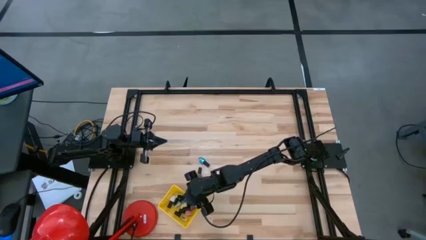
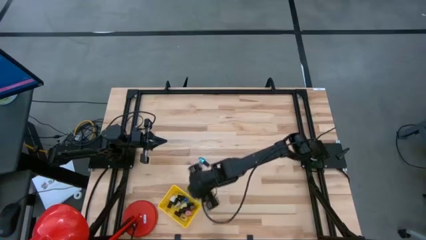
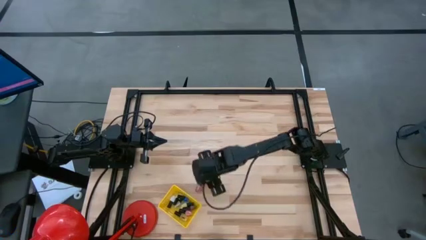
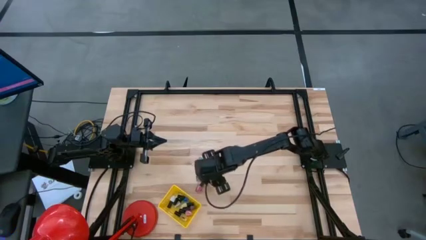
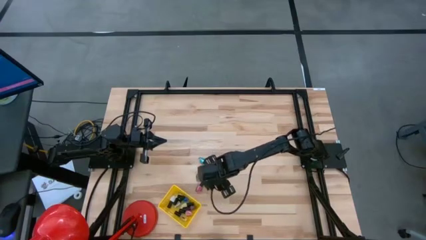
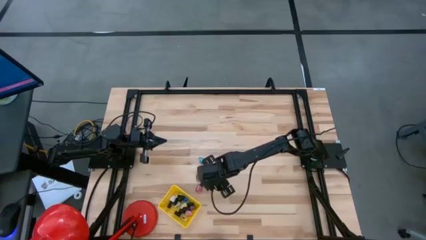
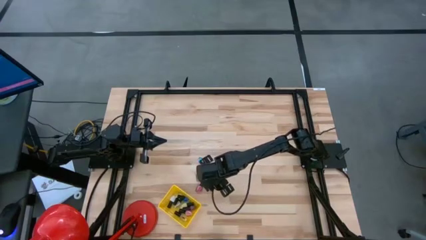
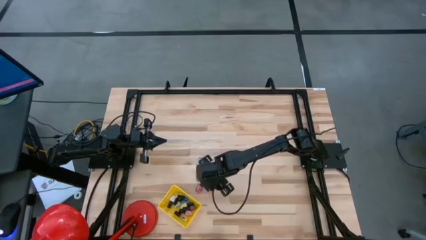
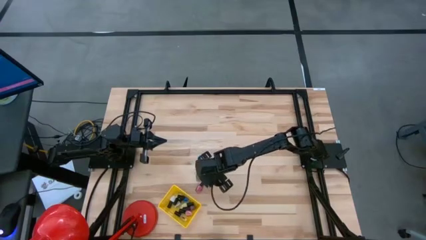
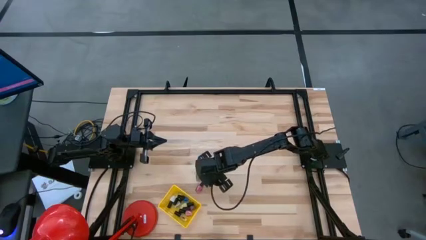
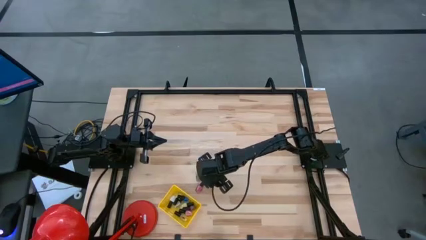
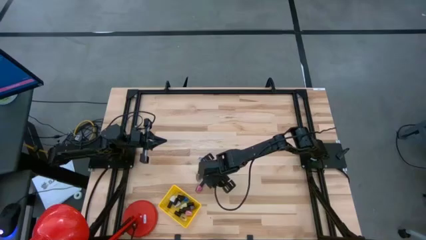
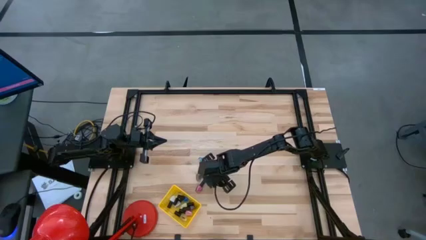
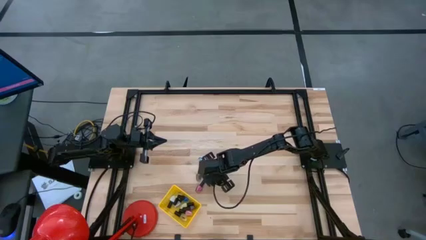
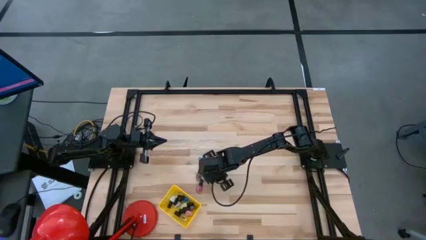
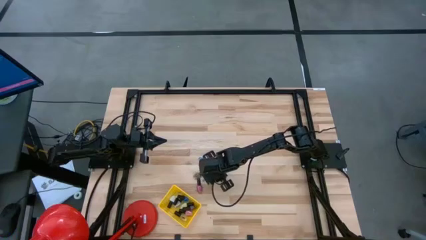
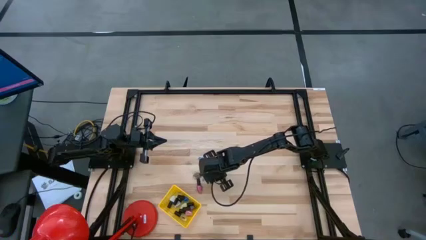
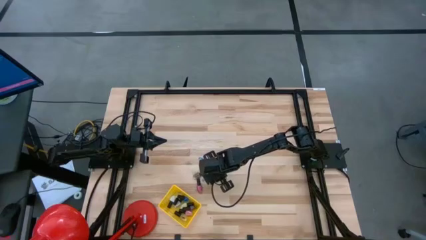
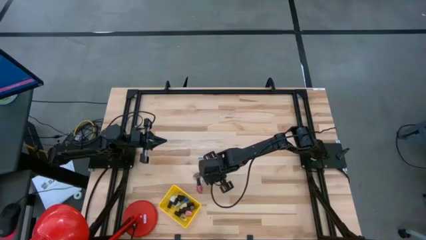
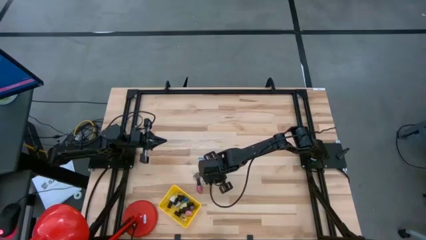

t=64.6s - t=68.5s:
Task: Pick & Place Nail Polish
Put the transparent nail polish into the yellow basket

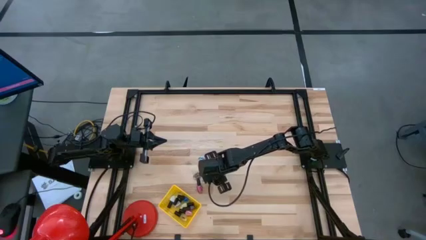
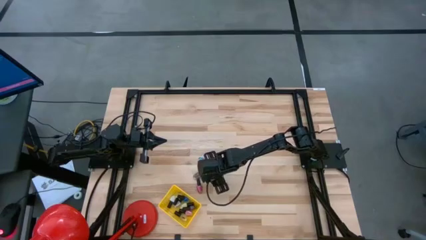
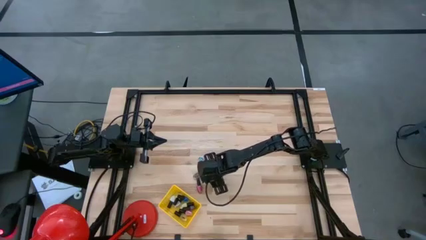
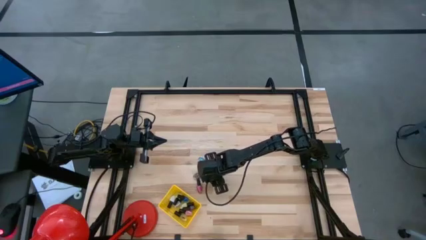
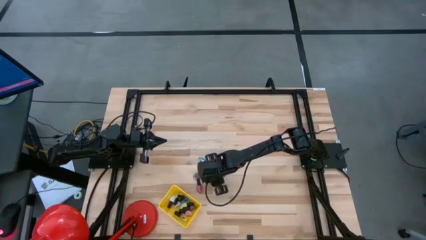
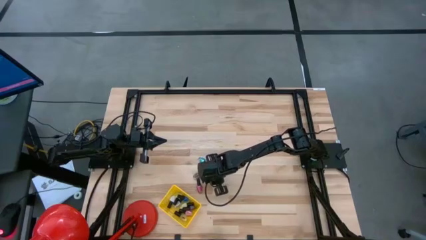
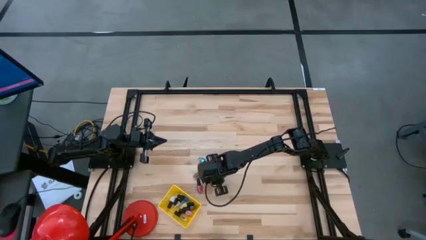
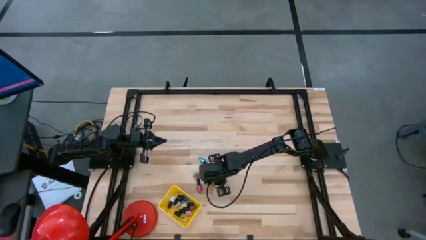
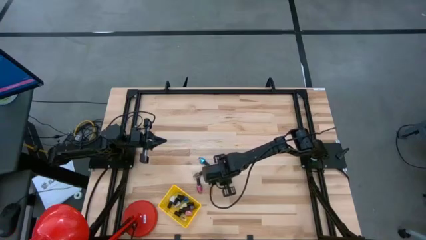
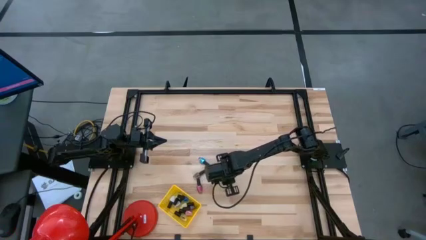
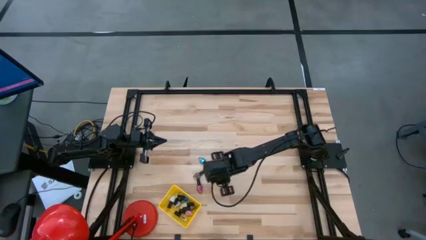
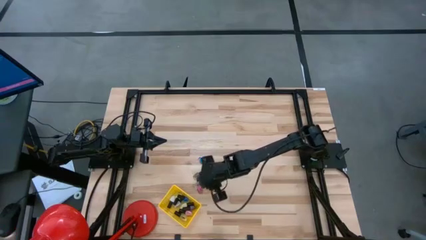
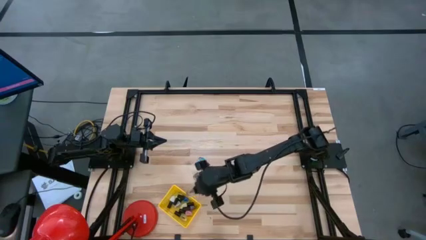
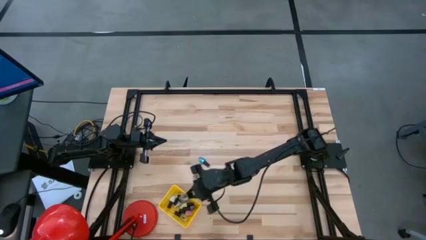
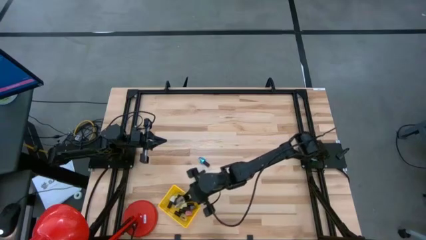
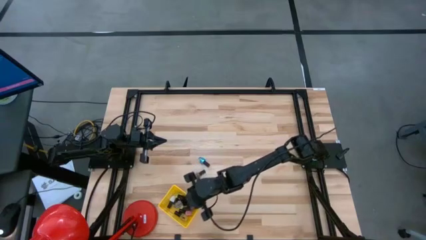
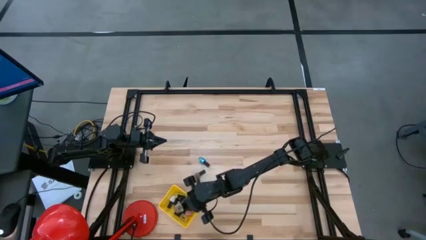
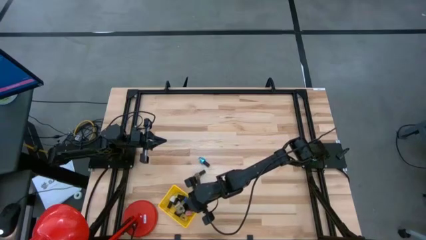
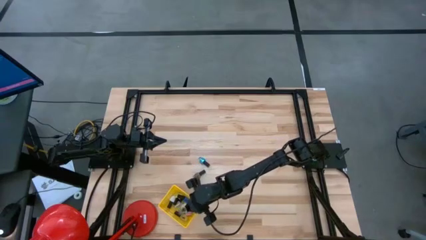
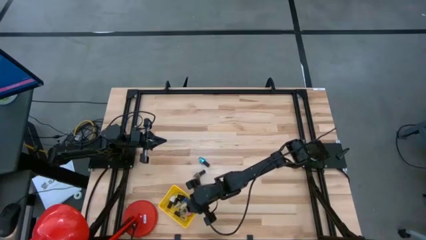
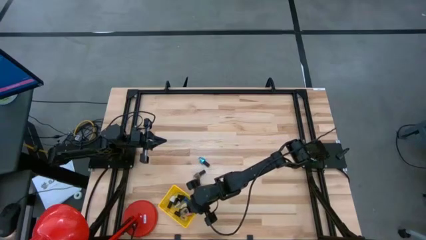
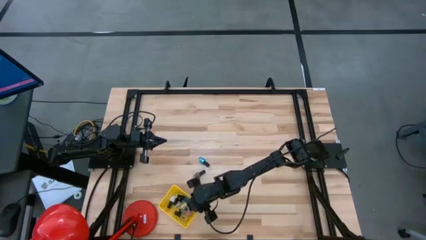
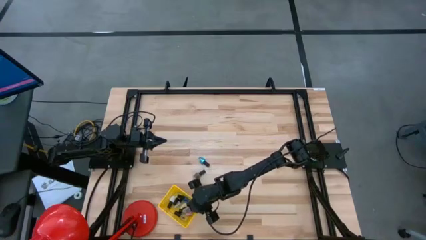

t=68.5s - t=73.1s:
Put the transparent nail polish into the yellow basket

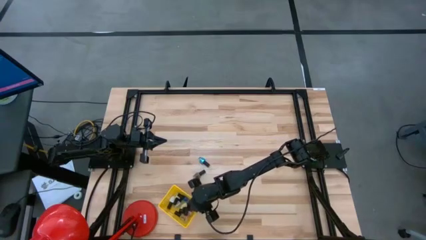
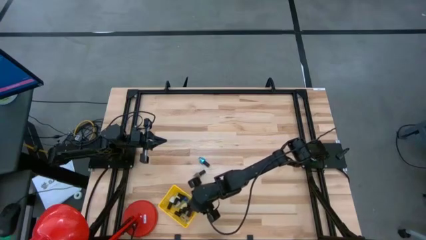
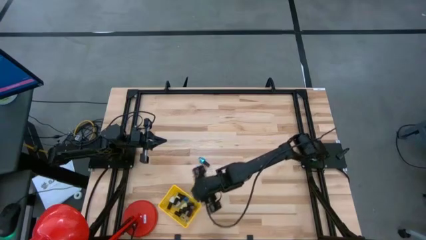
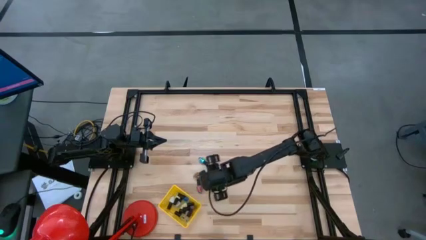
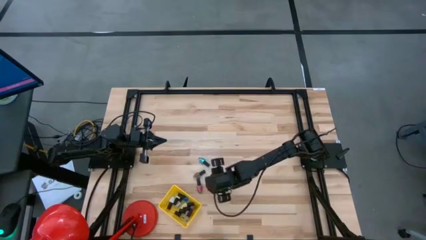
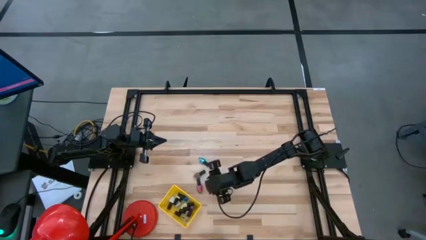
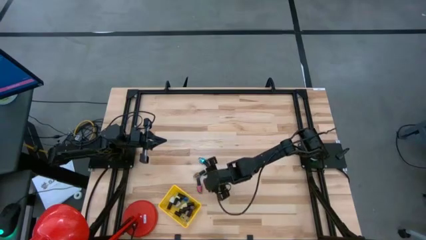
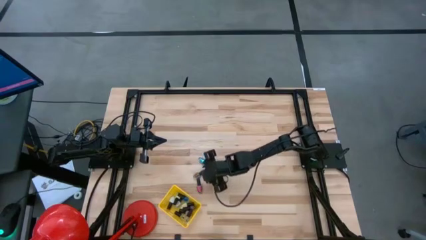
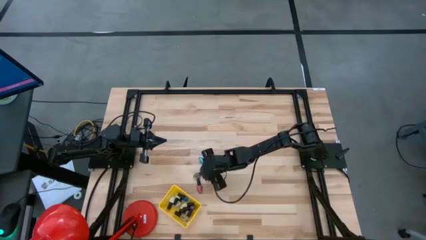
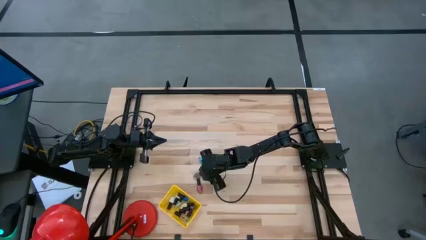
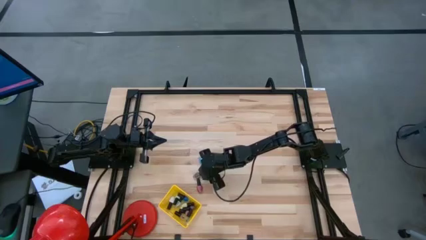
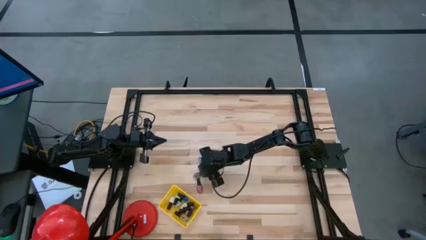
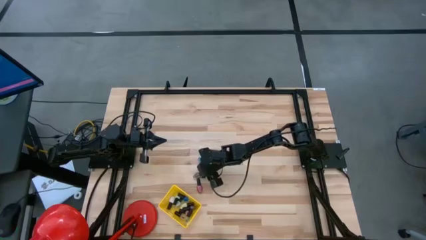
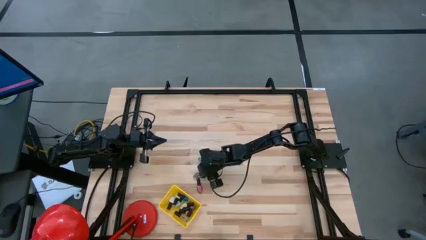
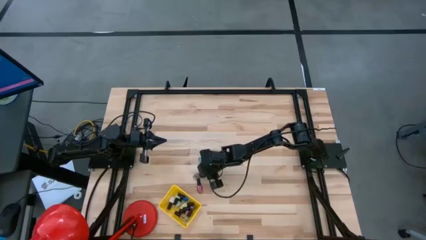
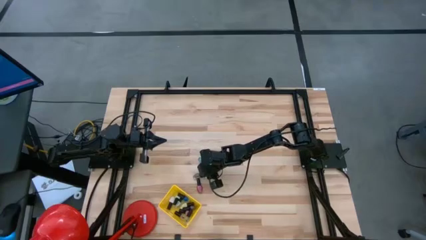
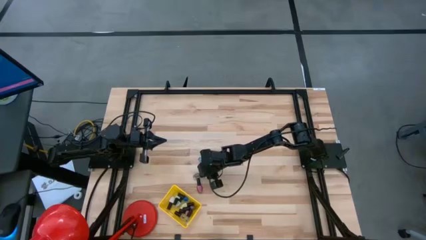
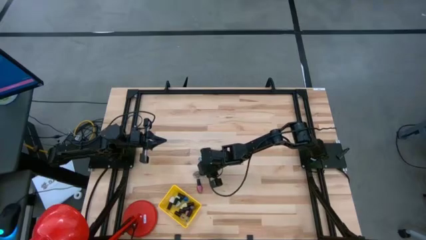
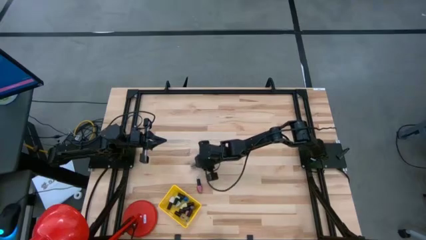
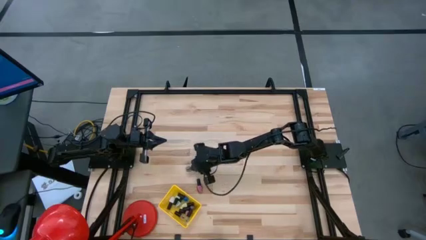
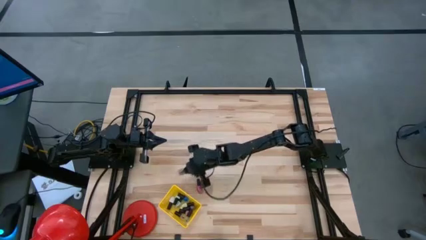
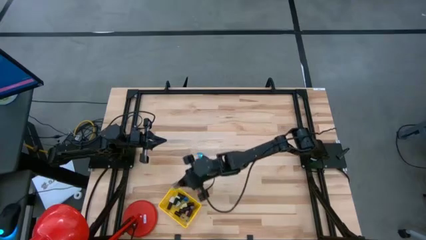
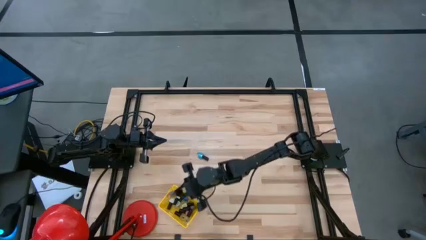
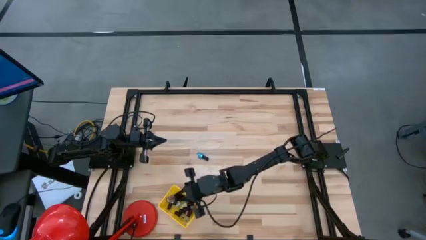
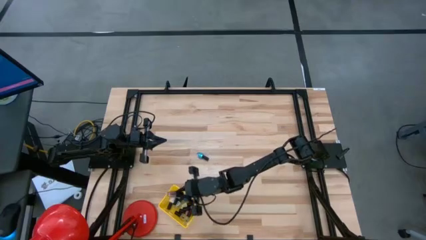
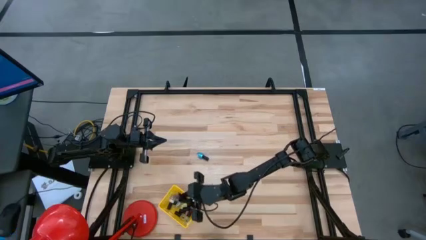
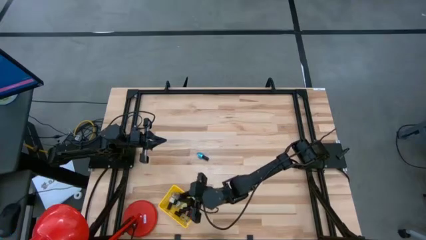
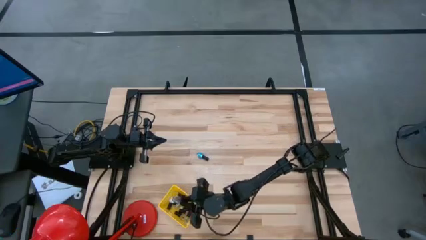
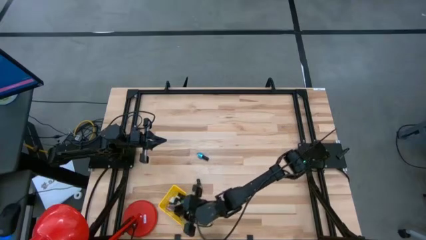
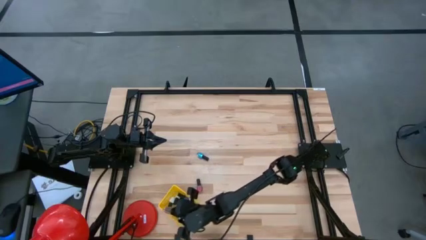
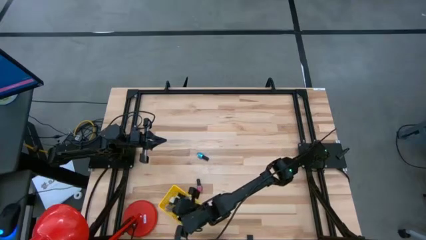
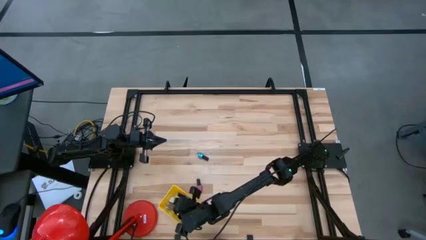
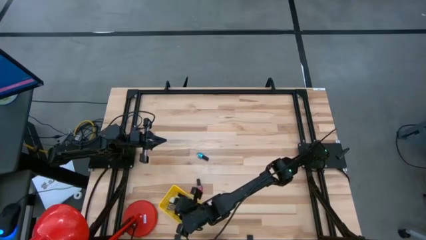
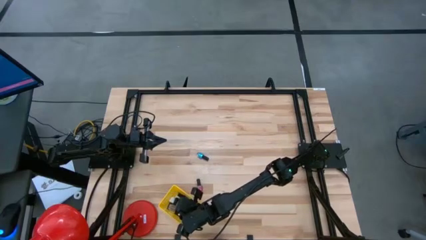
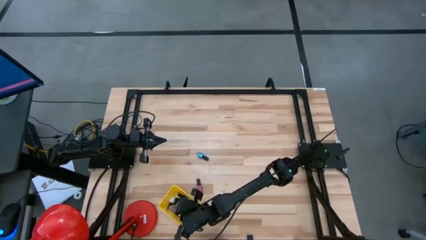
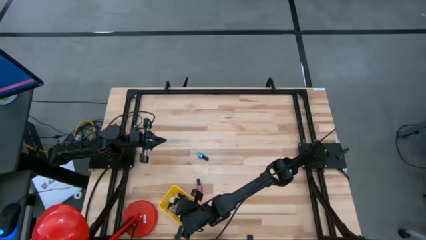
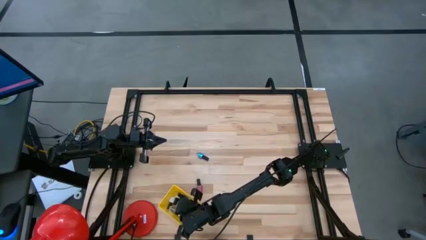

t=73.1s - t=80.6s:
Put the brown nail polish into the yellow basket
